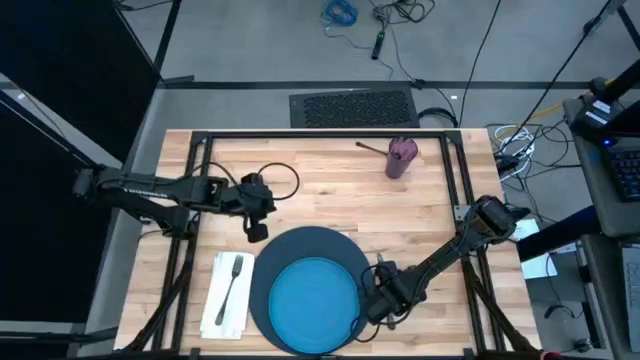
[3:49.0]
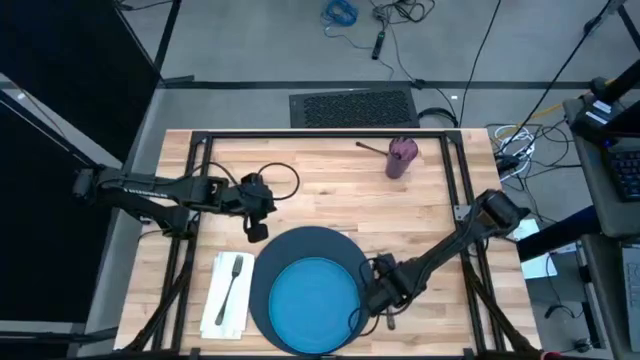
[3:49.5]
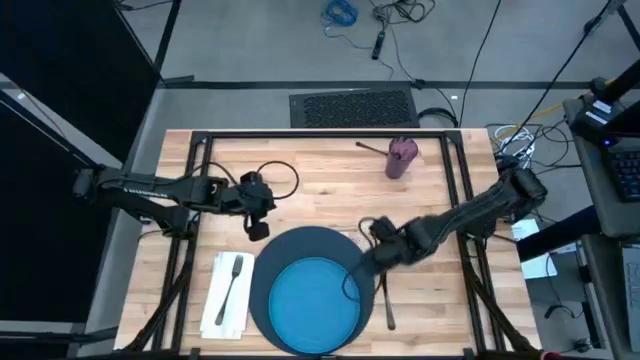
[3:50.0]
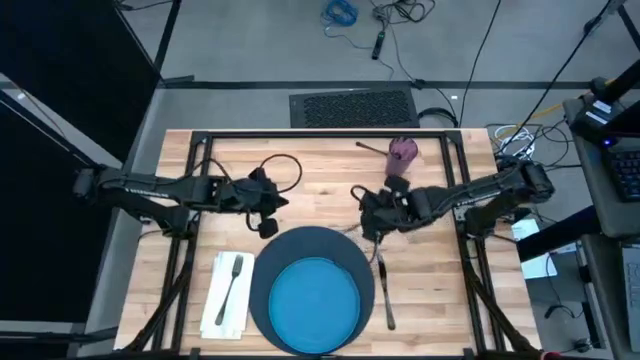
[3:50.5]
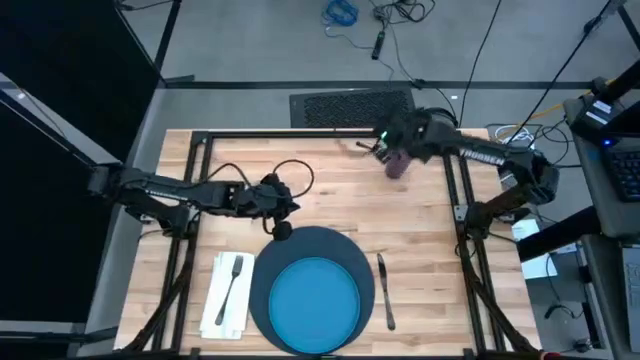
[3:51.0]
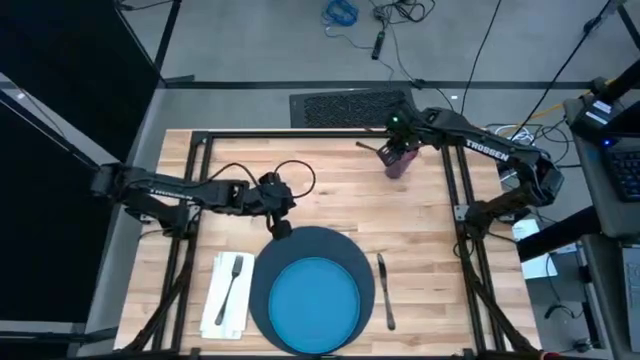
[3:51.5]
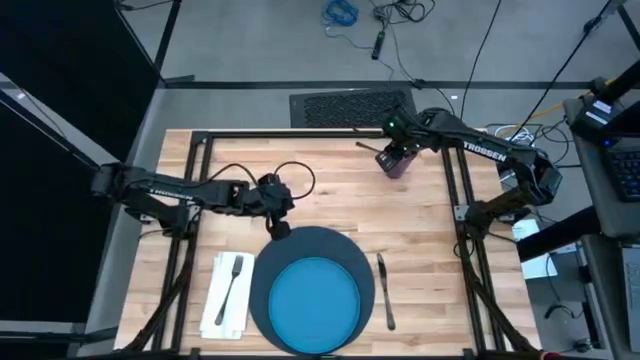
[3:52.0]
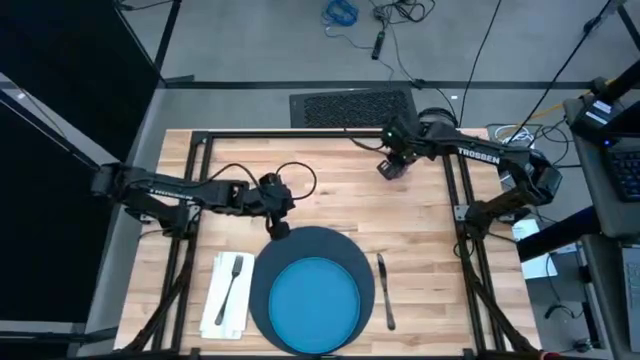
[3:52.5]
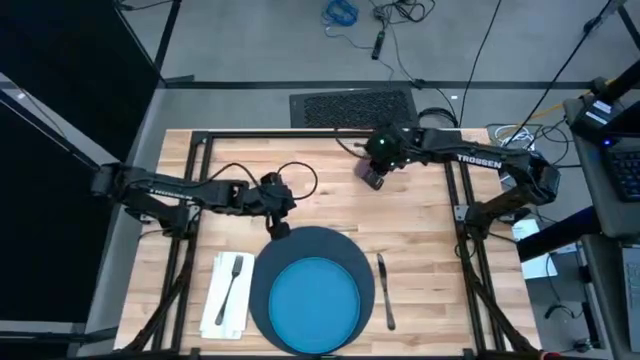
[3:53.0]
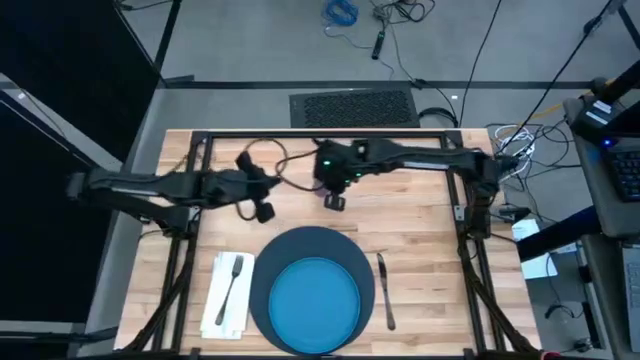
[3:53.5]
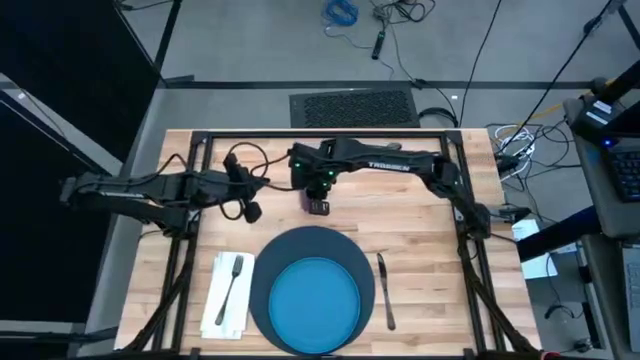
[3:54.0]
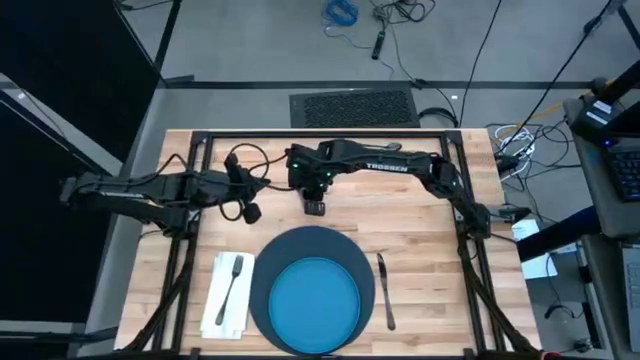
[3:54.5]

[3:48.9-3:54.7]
Task: Set table place
Move the purple cup to the top of the blue table mat

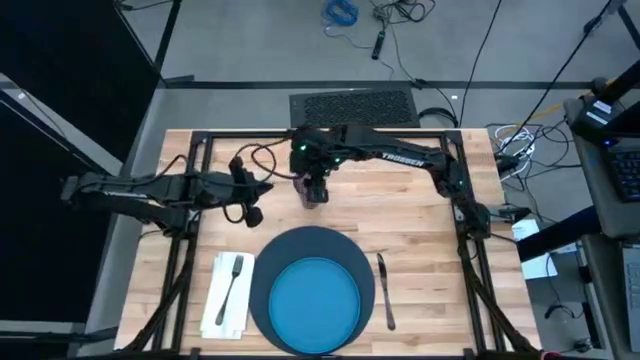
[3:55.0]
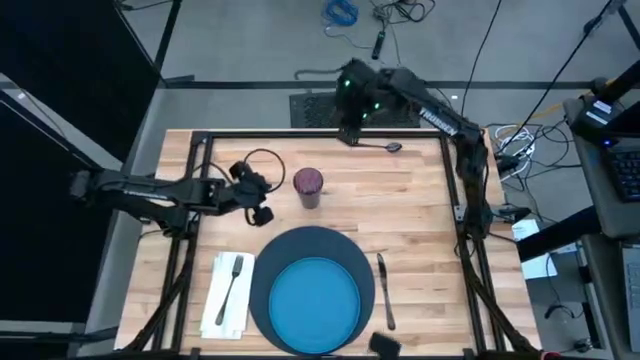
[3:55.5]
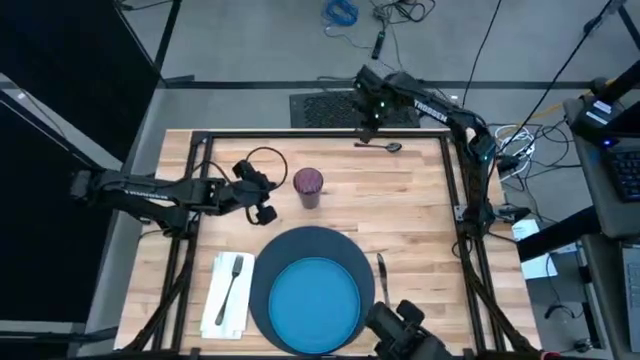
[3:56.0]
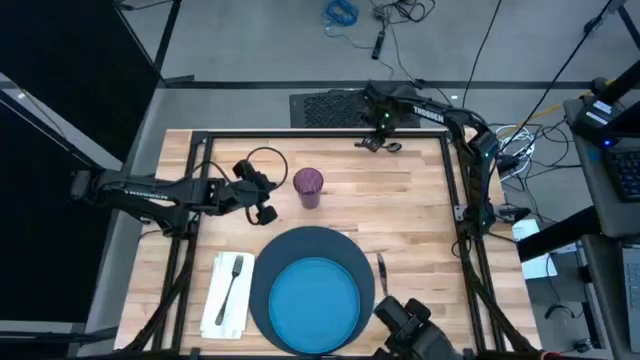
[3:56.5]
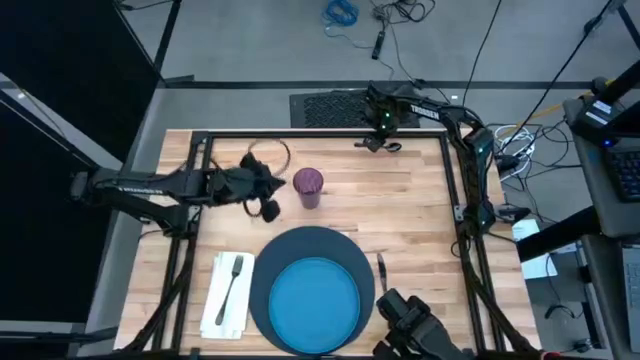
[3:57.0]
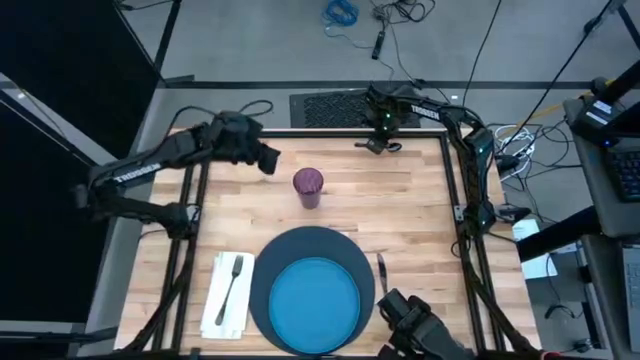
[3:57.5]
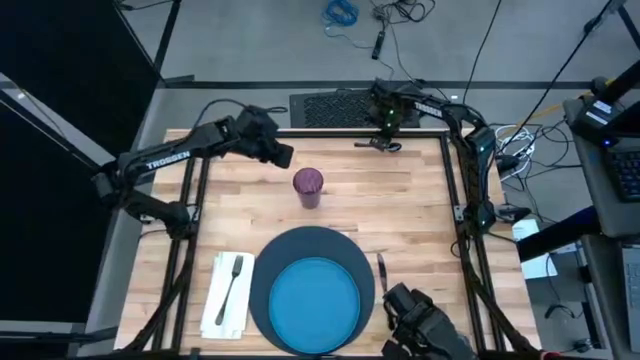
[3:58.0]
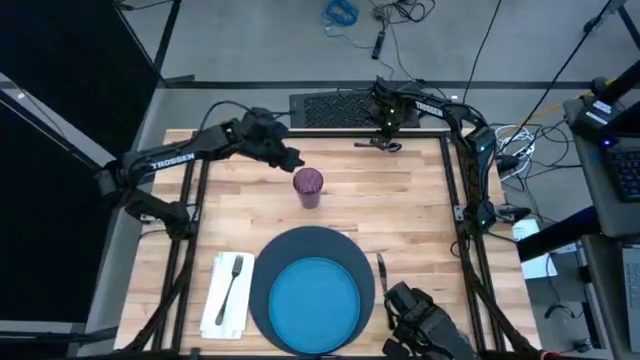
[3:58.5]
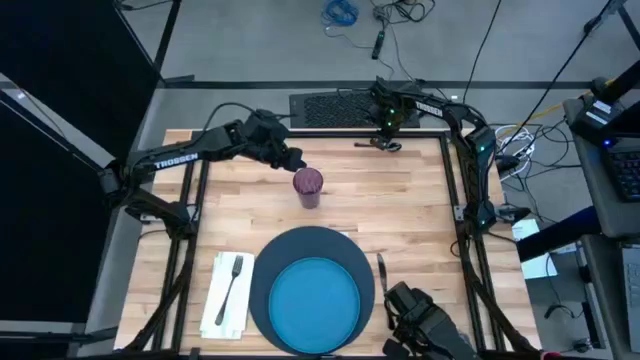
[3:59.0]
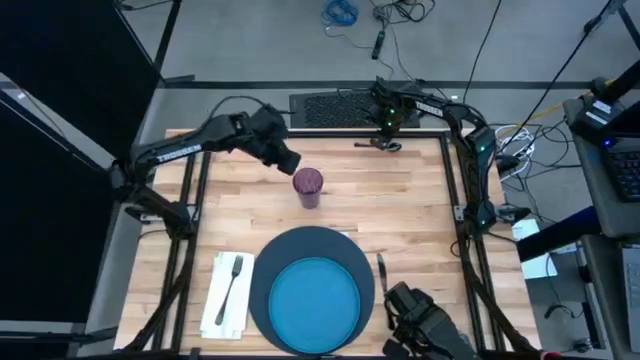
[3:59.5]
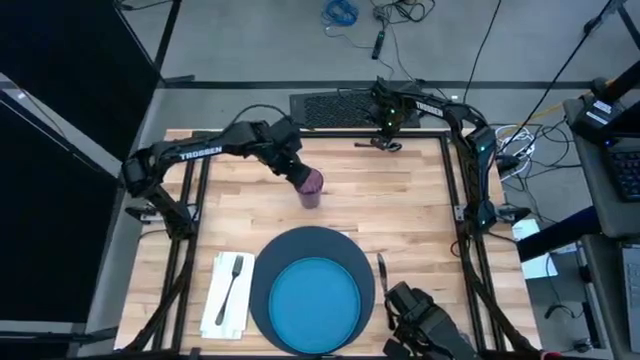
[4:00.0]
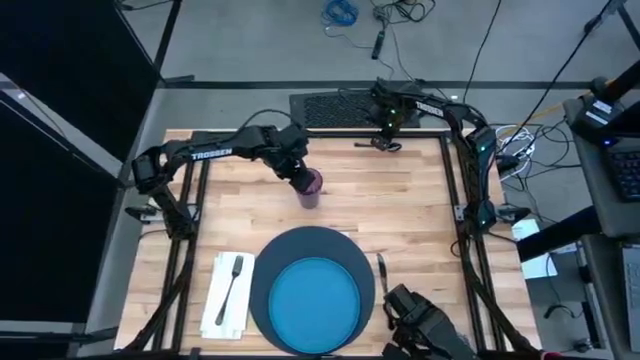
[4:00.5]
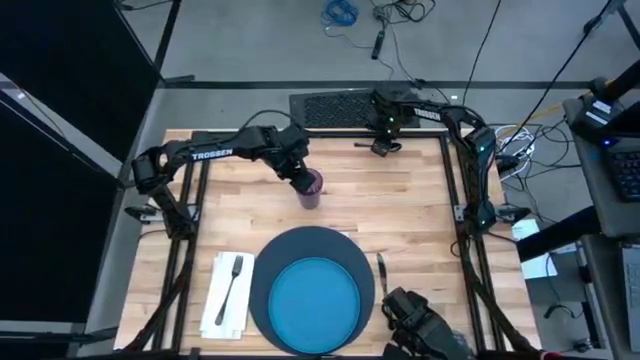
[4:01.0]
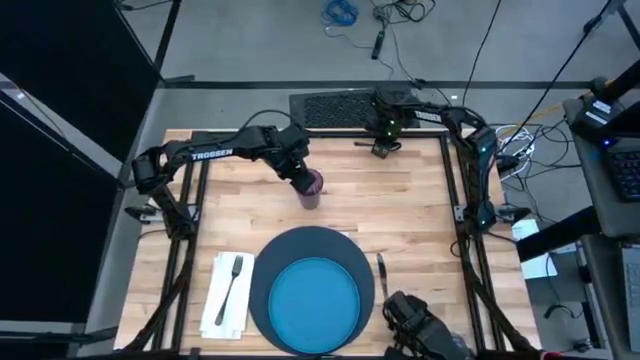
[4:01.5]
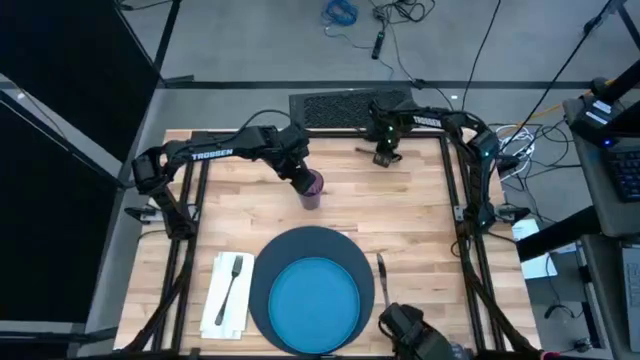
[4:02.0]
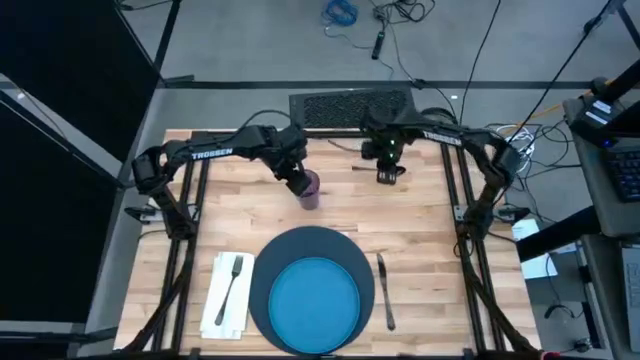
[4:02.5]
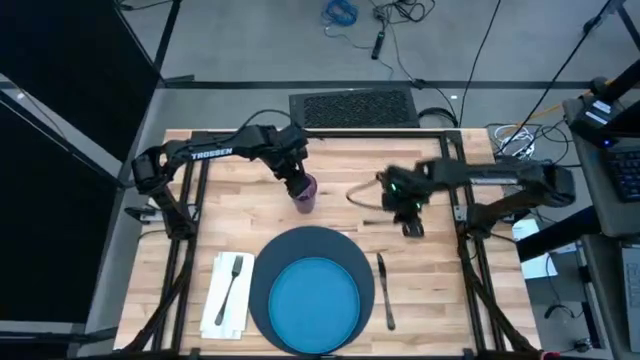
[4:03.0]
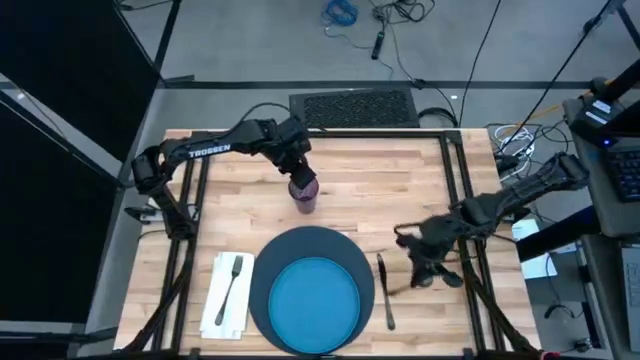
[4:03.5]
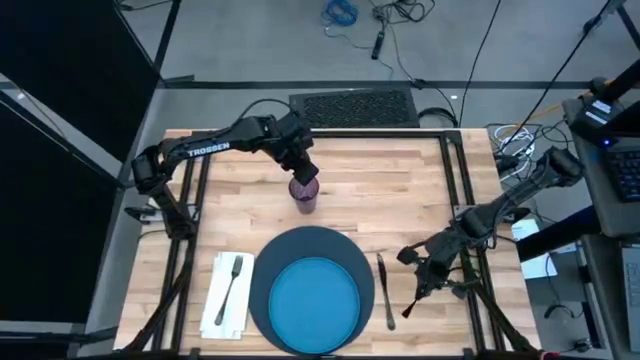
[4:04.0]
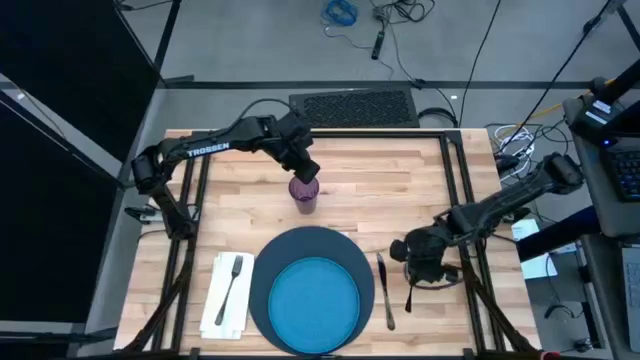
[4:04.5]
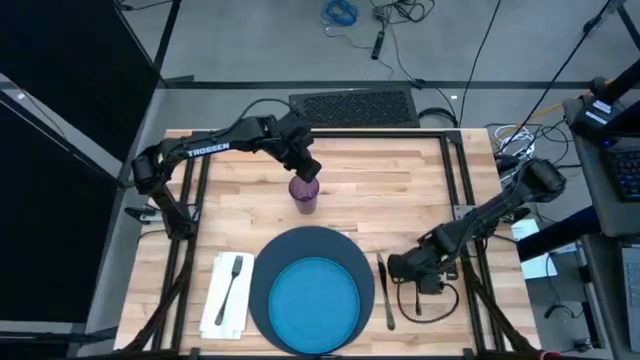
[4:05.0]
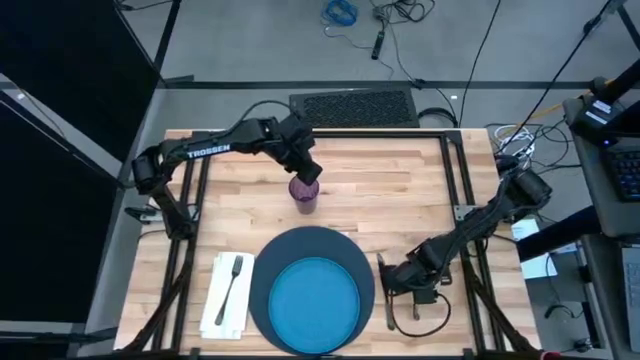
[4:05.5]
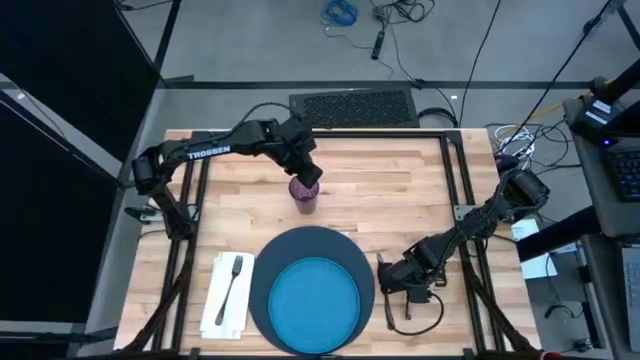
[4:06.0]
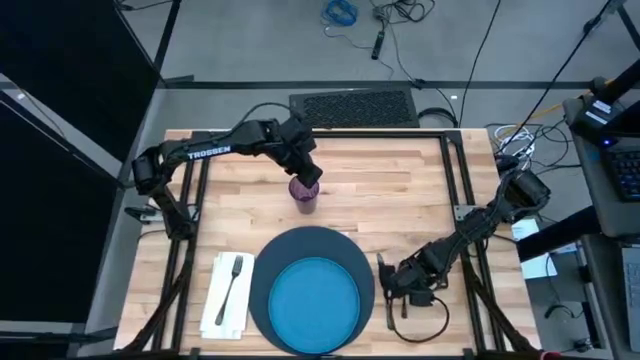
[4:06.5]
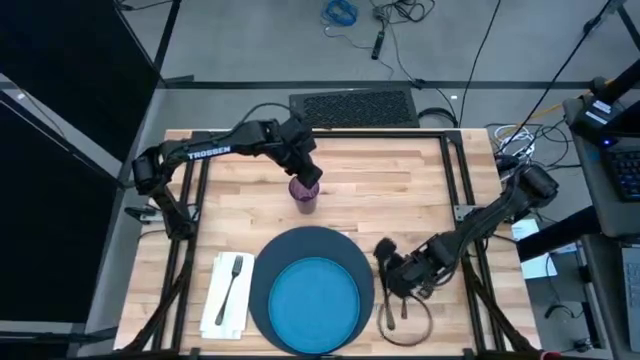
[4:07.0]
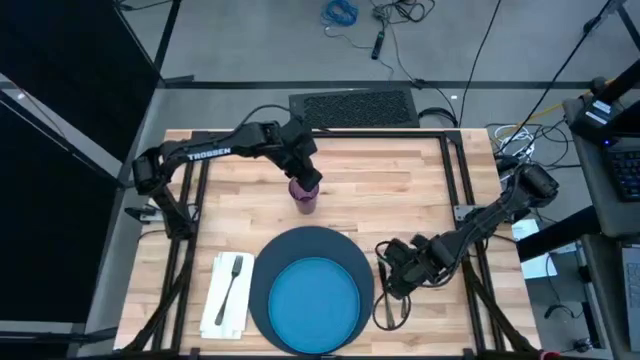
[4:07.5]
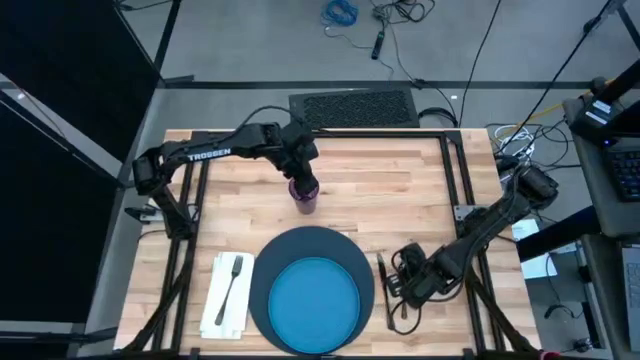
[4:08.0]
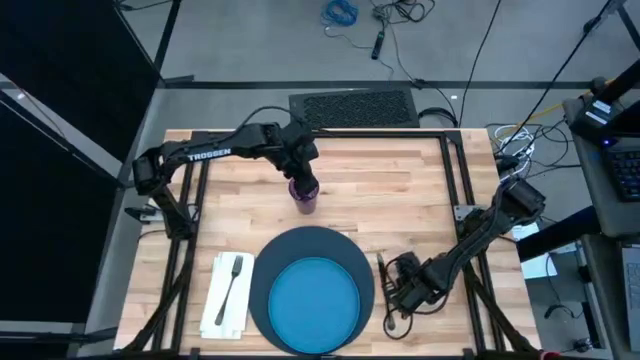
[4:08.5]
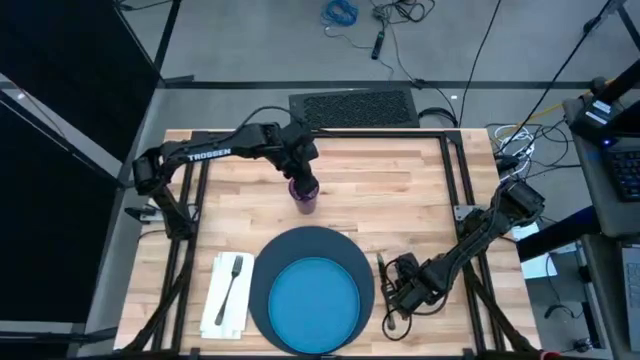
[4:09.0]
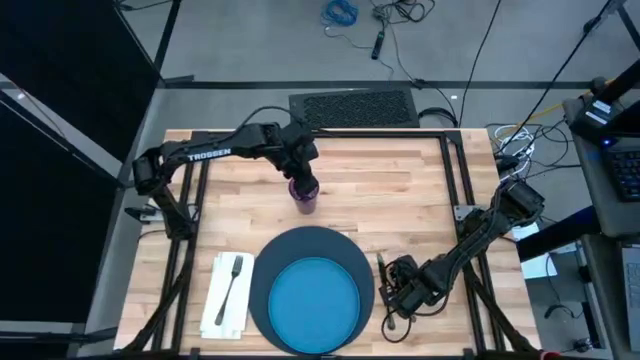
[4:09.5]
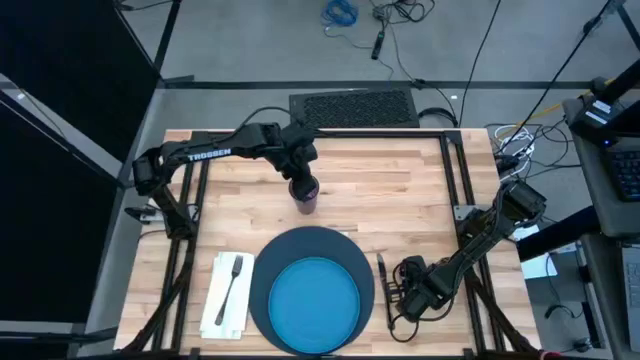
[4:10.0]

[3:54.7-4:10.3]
Put the spoon beside the knife

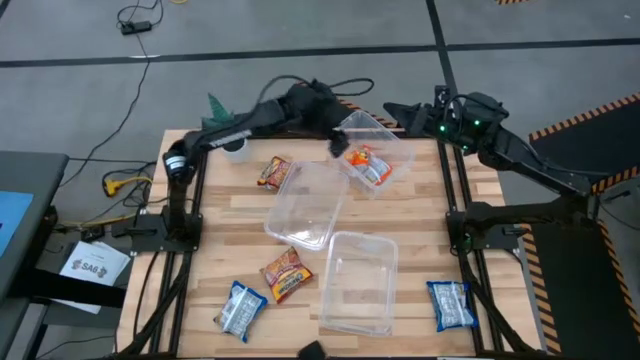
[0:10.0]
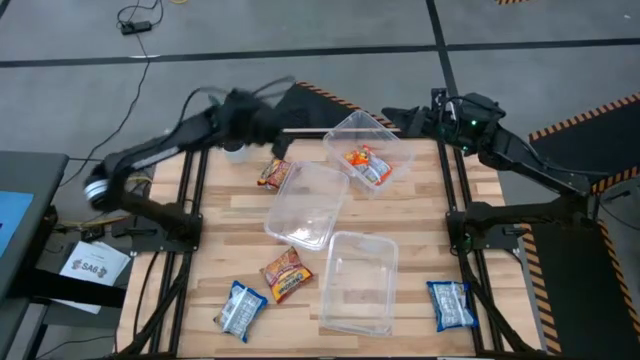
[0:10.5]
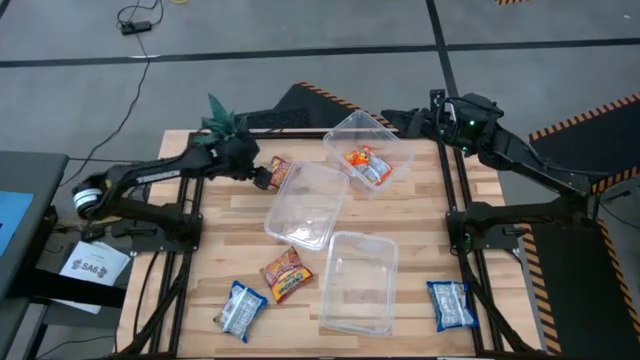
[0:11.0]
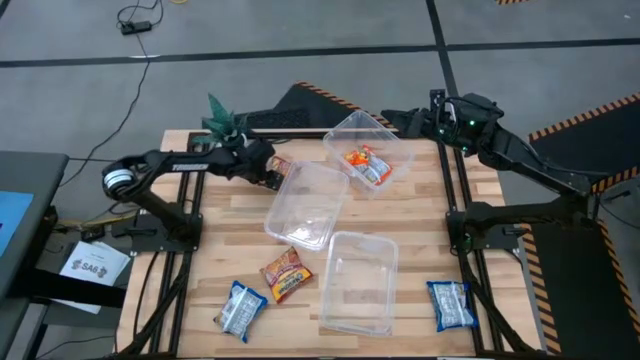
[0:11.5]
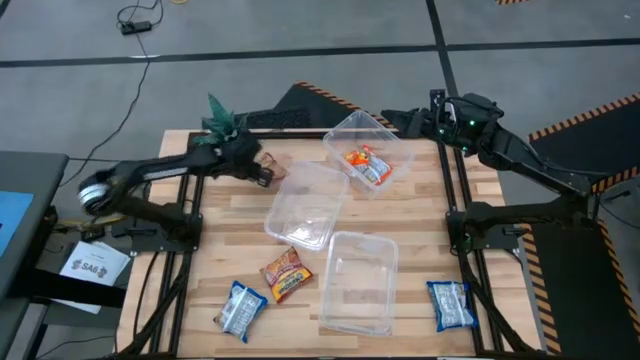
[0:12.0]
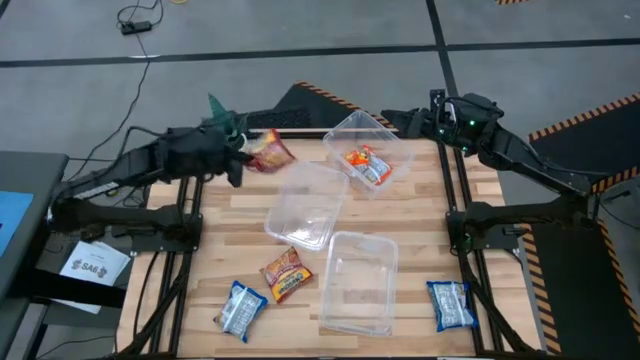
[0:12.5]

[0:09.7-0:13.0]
Task: Sort Maruchan noodles
Put the top red noodle pack into the middle transparent bin
